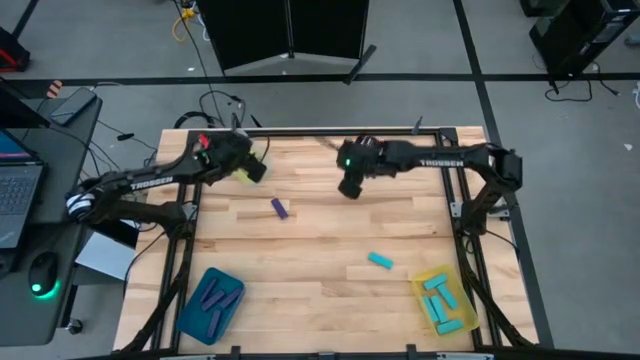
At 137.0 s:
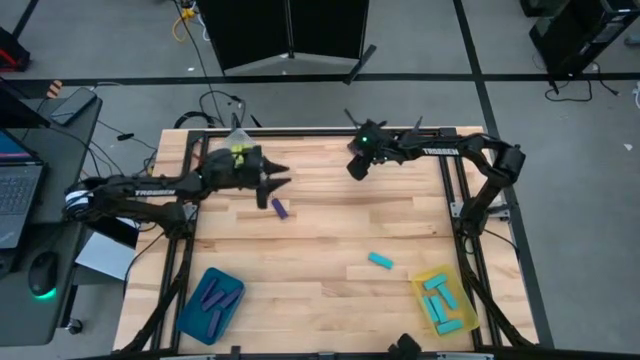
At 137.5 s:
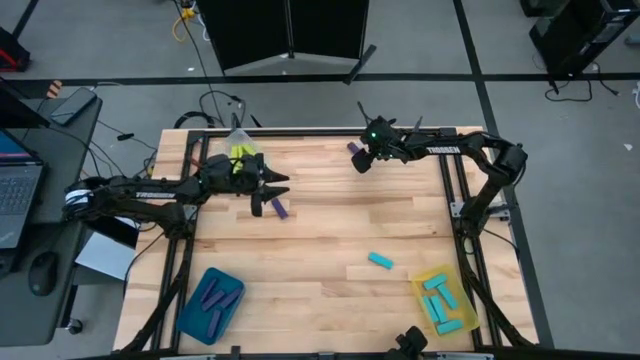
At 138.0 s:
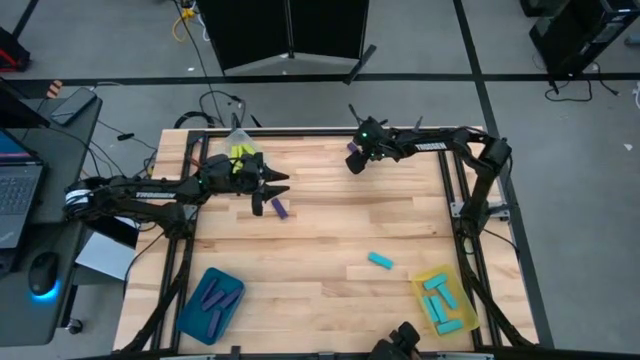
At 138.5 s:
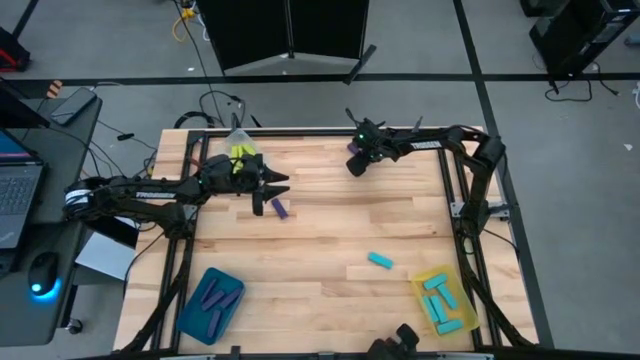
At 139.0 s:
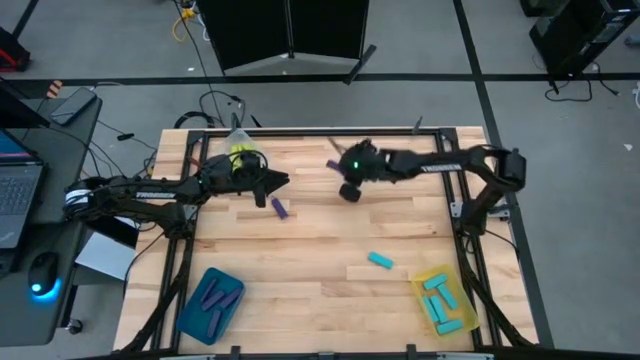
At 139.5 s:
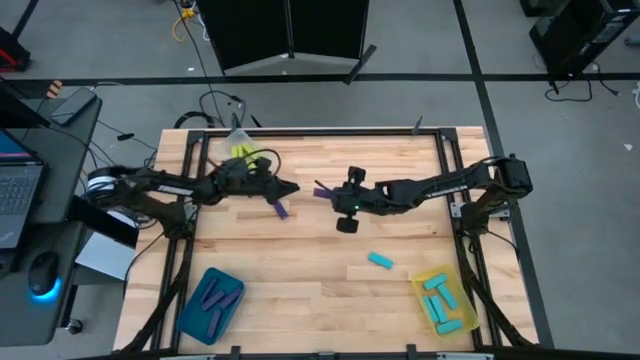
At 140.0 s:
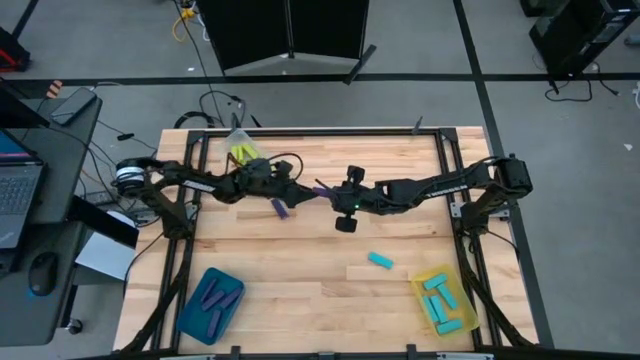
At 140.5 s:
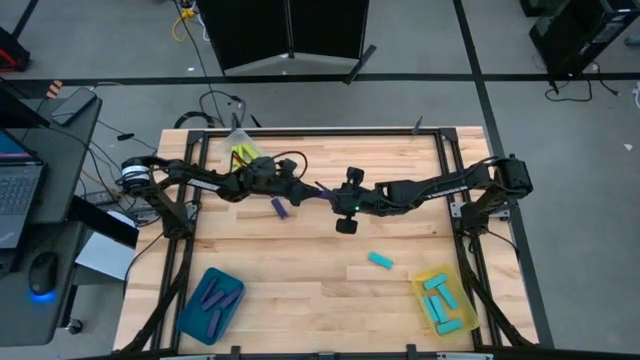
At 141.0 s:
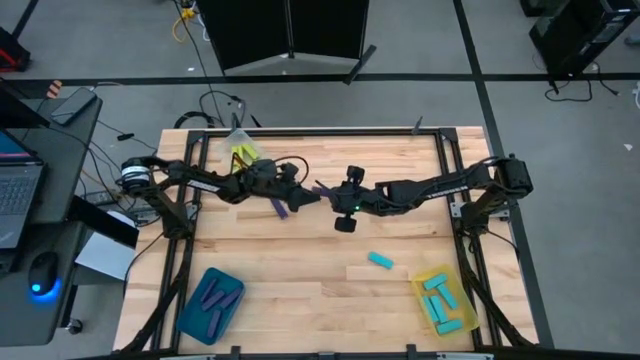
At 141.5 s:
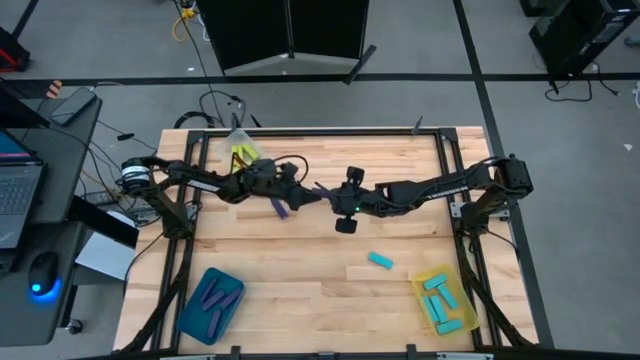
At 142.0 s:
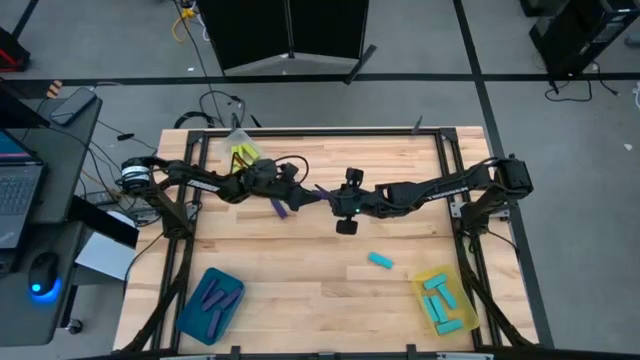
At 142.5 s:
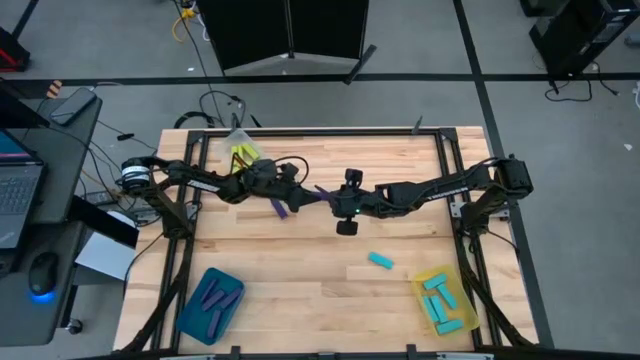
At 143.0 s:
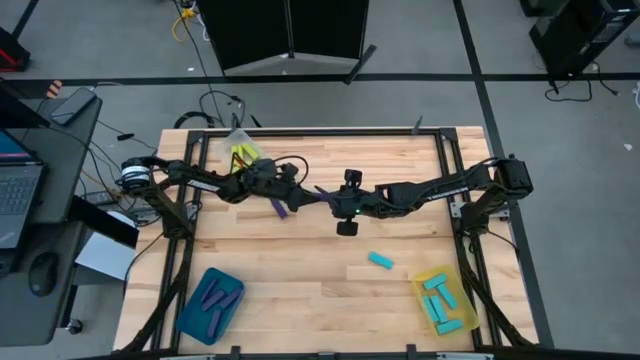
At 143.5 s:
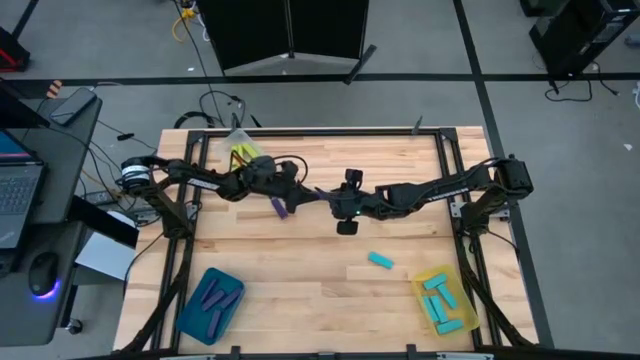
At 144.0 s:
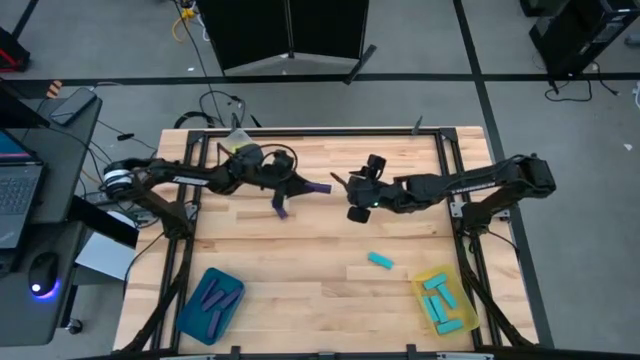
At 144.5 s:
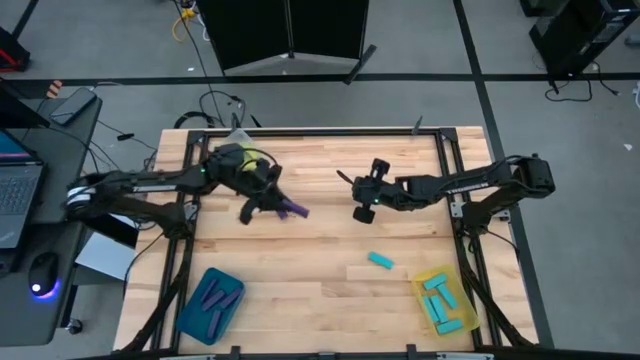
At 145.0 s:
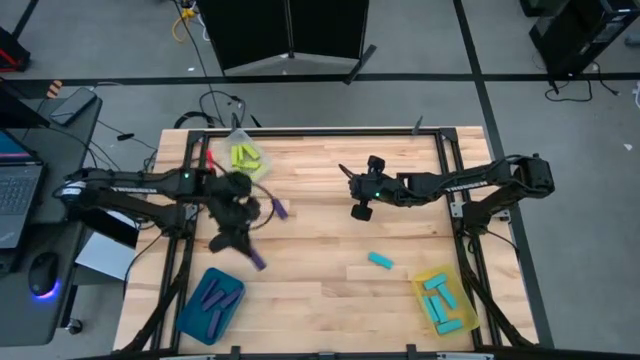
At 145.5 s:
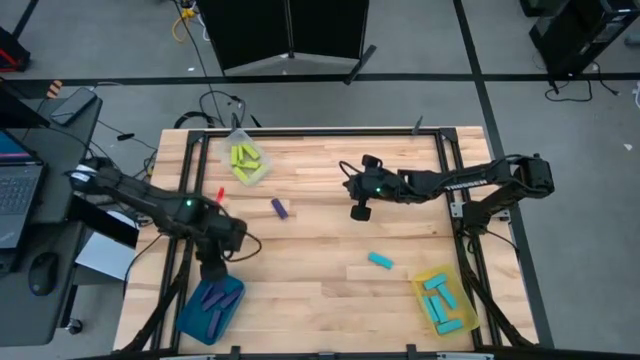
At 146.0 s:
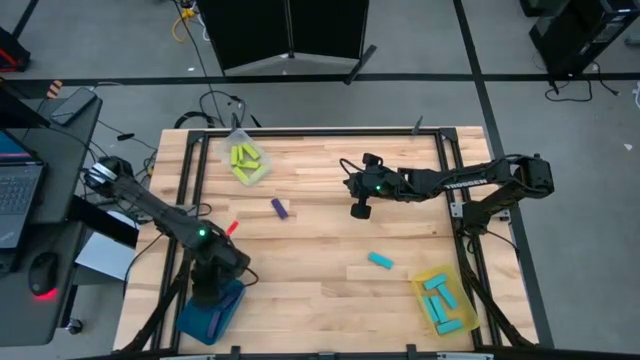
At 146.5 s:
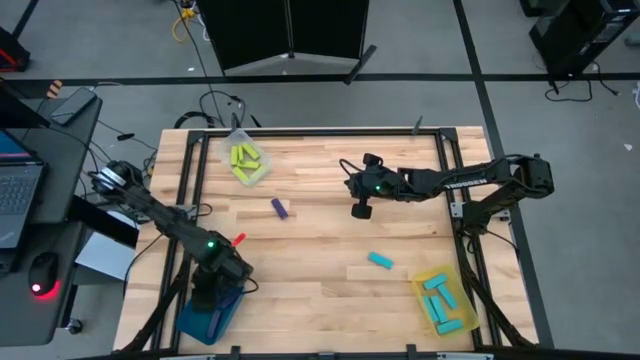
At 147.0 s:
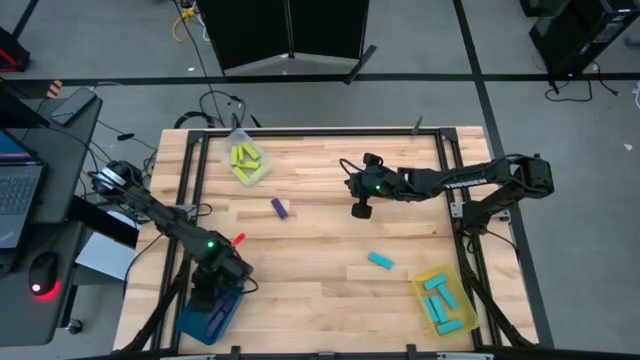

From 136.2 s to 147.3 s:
Task: Sort blocks
Put the purple block into the blue bin

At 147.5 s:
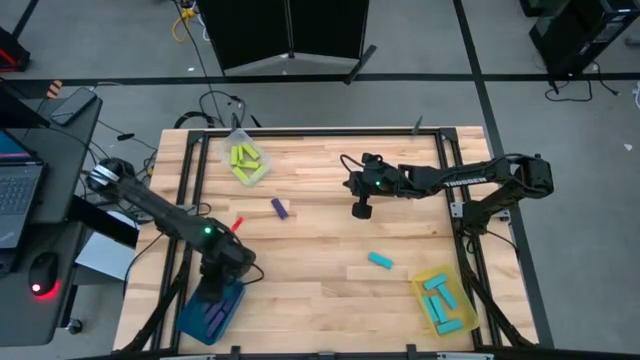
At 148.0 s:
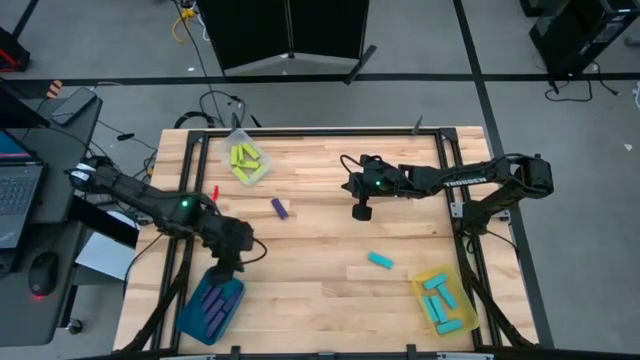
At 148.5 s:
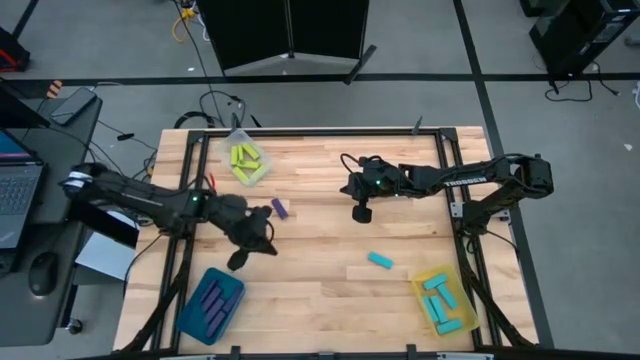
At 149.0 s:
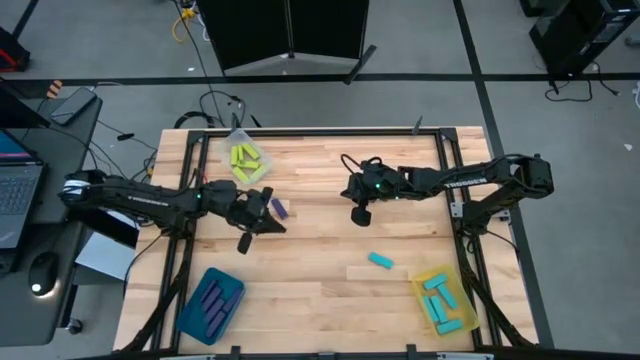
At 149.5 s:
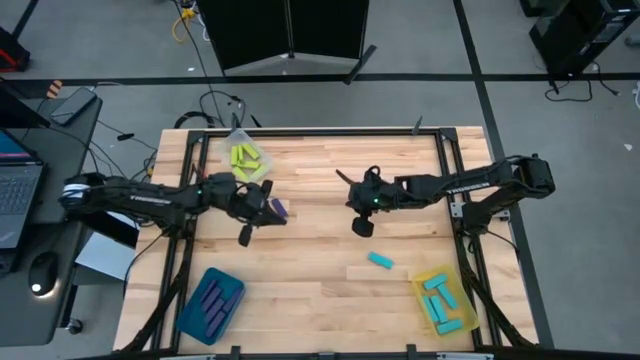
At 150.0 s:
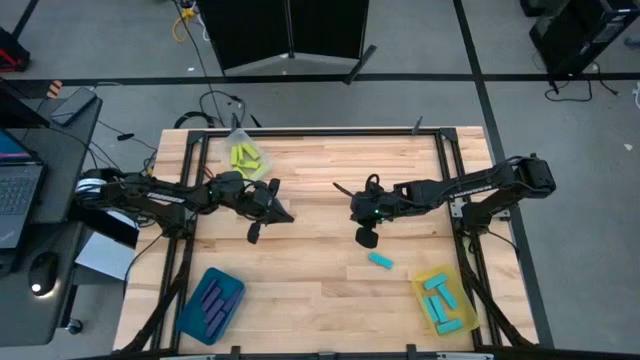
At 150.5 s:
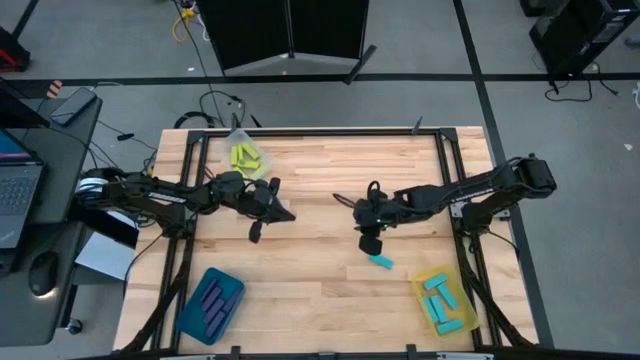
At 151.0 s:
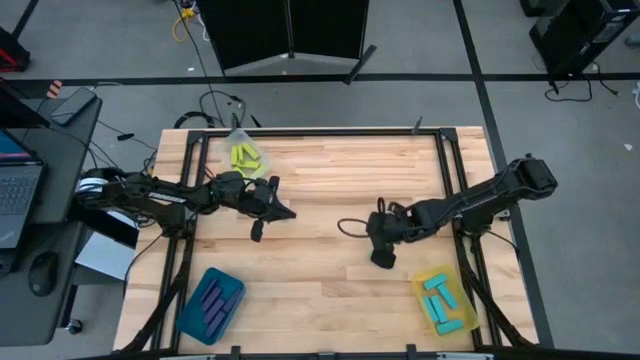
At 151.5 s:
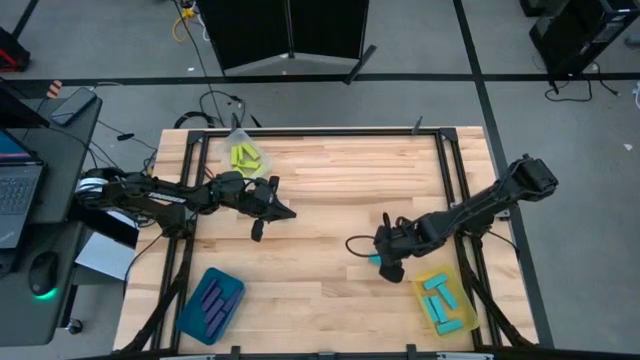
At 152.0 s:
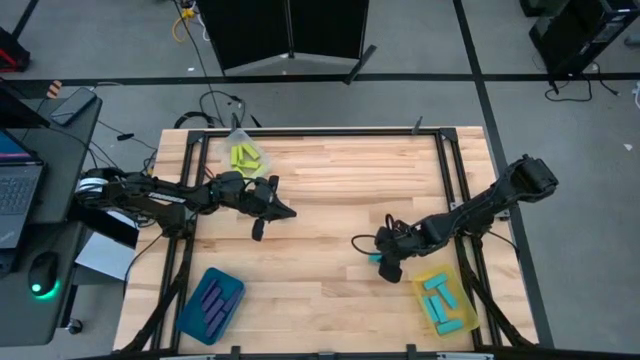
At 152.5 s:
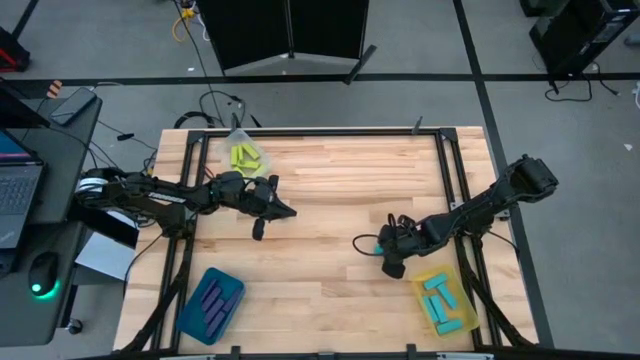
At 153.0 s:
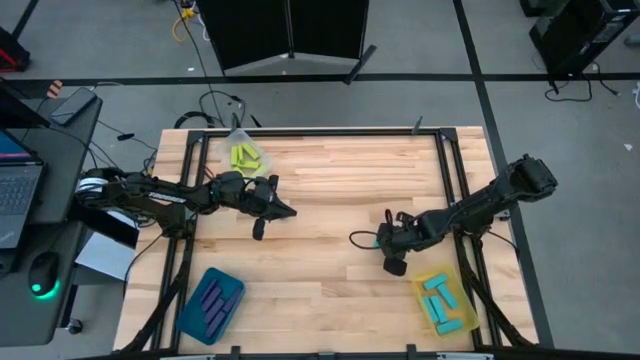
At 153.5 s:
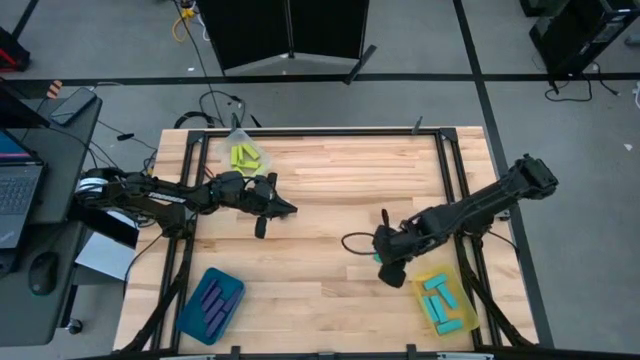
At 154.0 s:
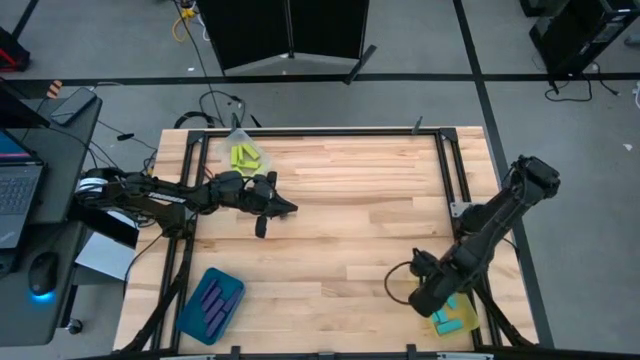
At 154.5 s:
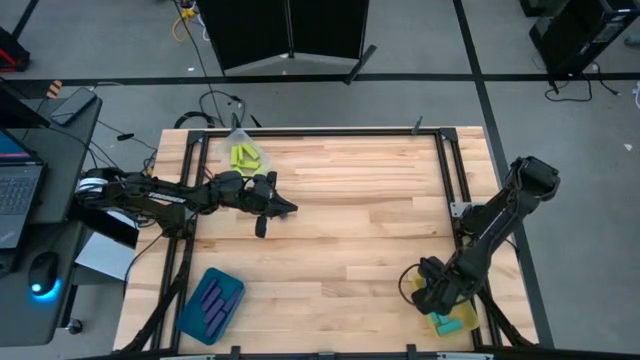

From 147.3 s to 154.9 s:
Put the blue block into the yellow bin

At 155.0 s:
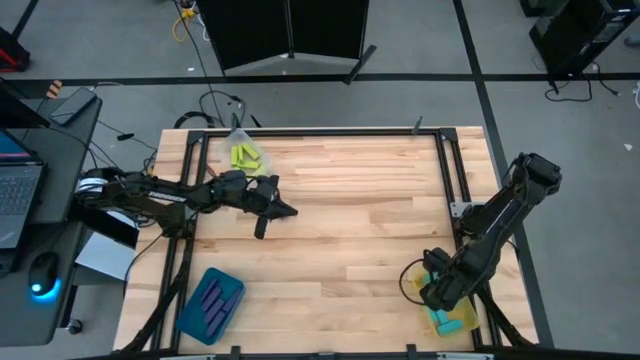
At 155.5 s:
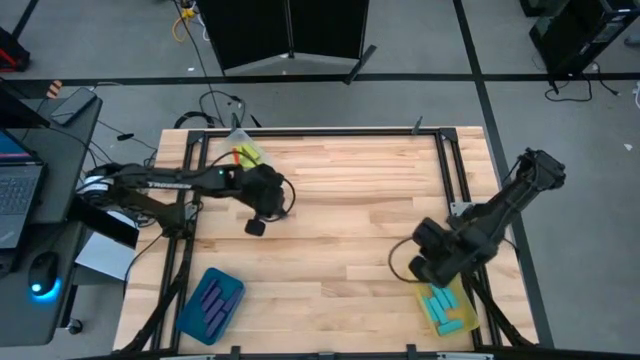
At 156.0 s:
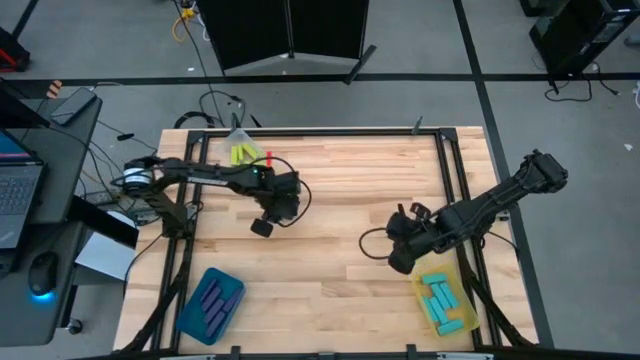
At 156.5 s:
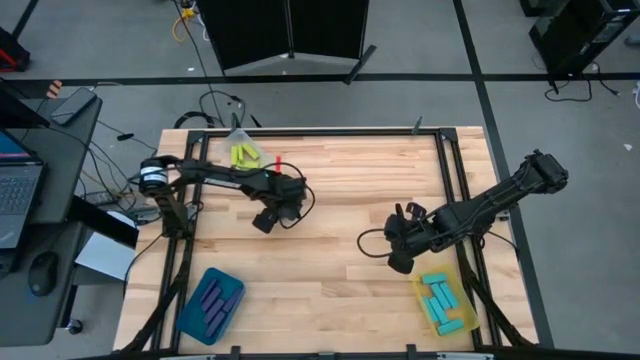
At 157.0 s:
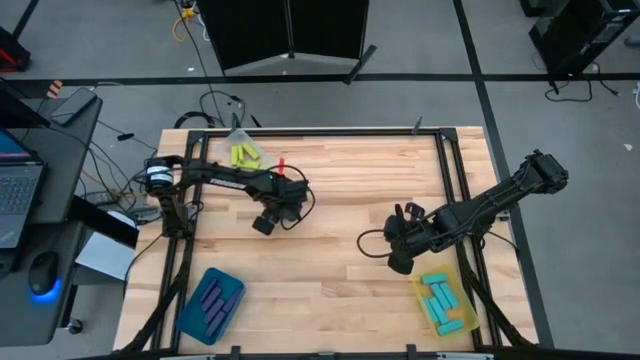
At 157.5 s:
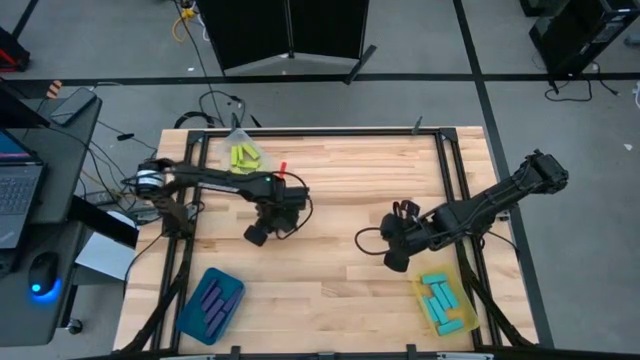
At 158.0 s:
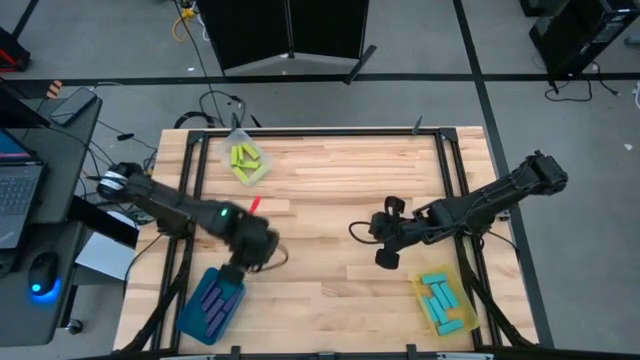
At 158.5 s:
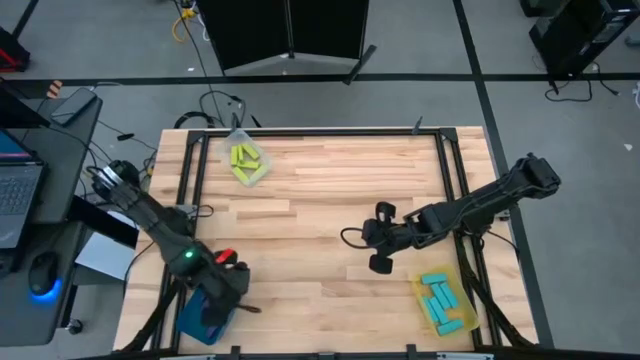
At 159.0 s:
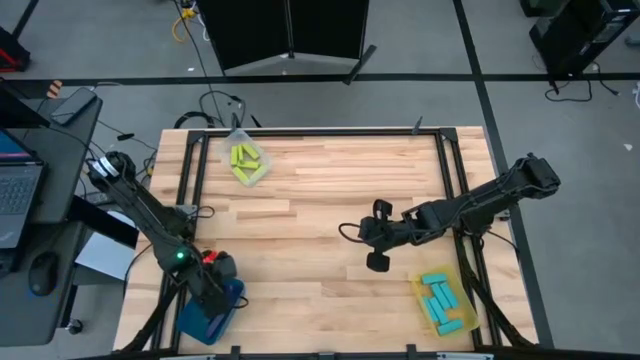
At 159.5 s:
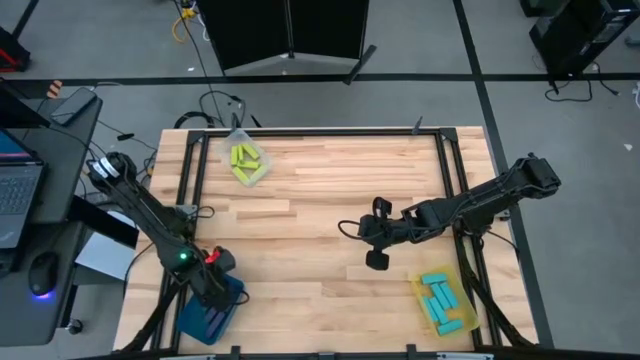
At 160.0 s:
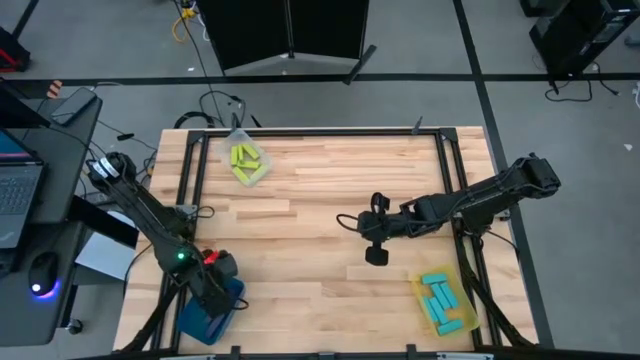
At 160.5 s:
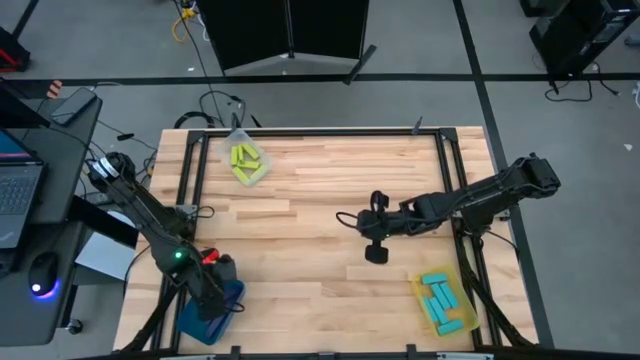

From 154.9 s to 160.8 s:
Put the purple block into the blue bin
